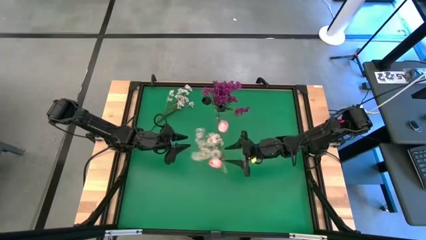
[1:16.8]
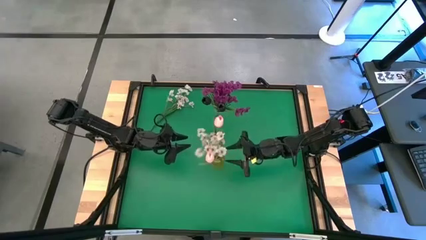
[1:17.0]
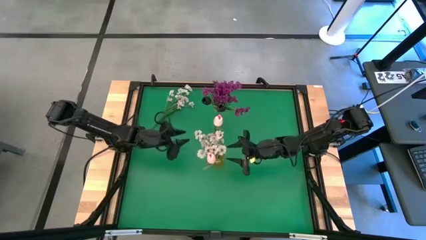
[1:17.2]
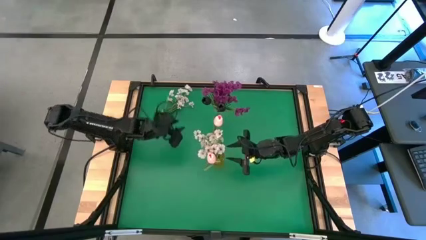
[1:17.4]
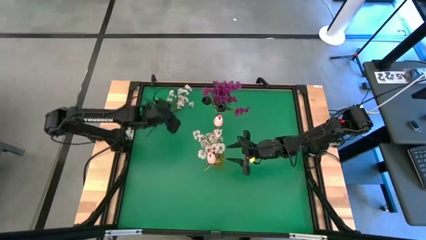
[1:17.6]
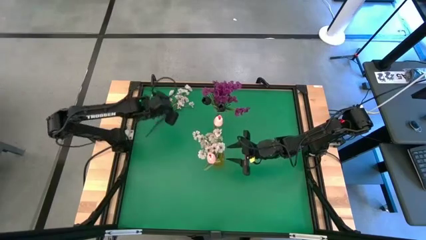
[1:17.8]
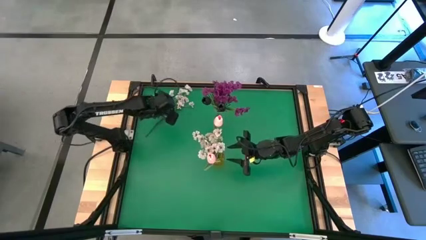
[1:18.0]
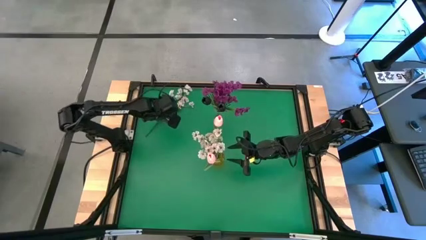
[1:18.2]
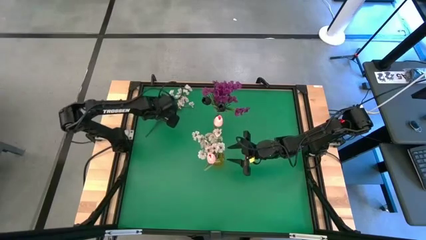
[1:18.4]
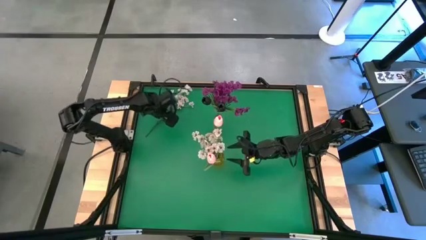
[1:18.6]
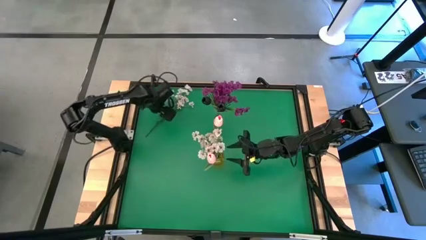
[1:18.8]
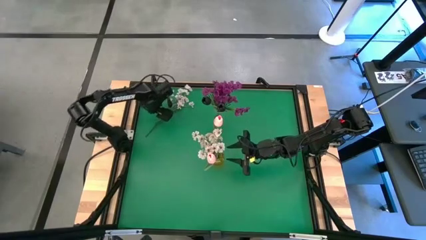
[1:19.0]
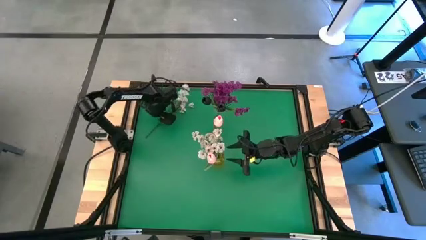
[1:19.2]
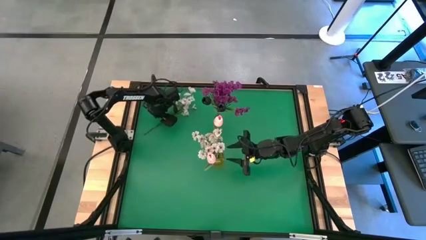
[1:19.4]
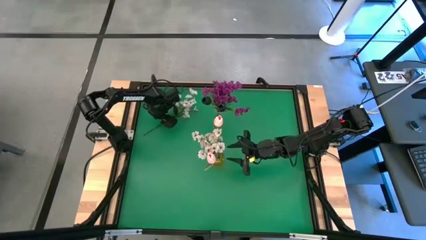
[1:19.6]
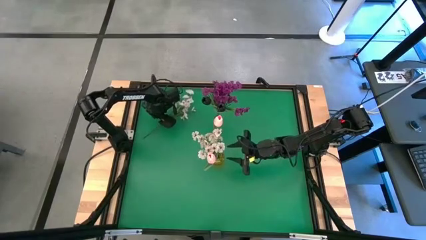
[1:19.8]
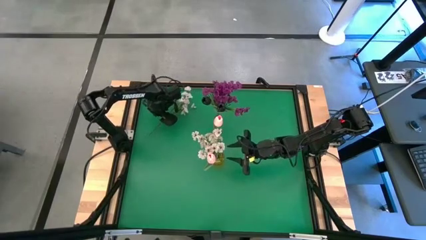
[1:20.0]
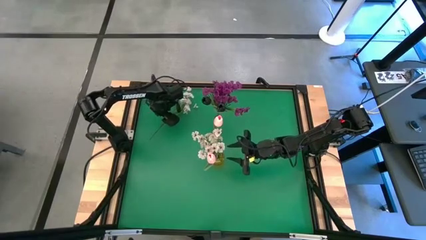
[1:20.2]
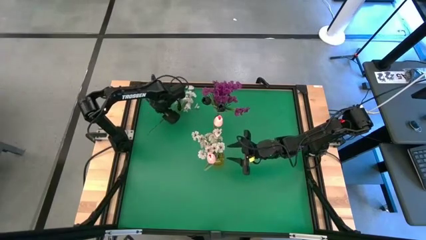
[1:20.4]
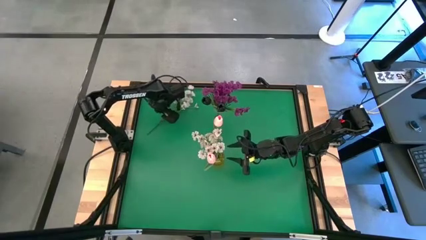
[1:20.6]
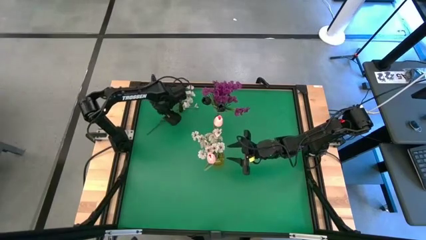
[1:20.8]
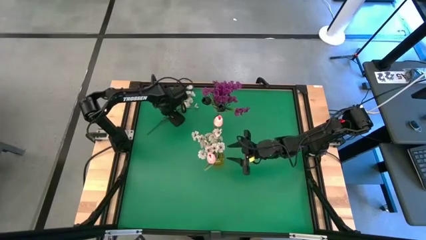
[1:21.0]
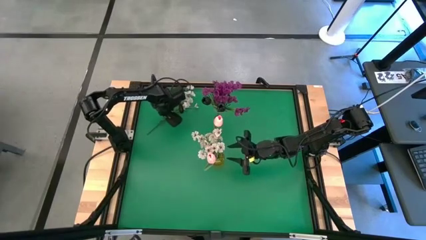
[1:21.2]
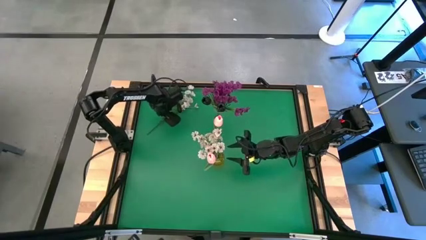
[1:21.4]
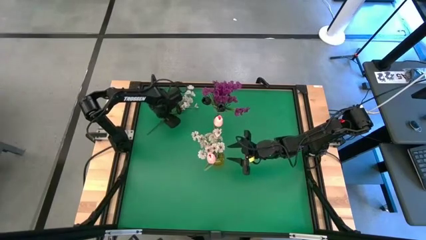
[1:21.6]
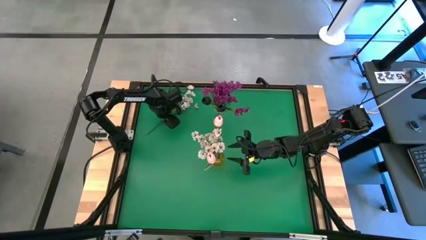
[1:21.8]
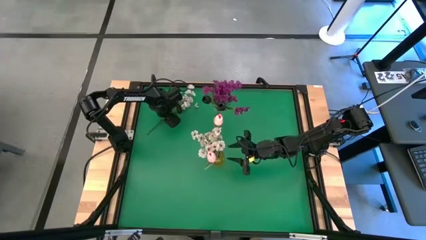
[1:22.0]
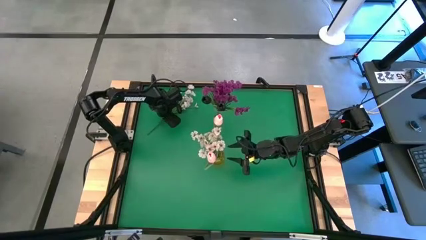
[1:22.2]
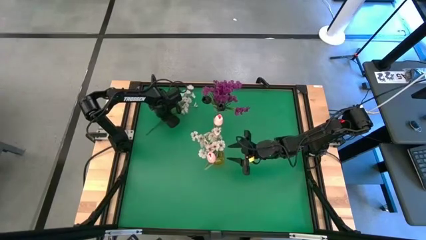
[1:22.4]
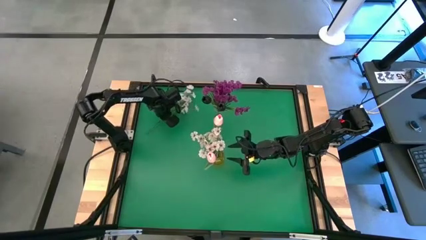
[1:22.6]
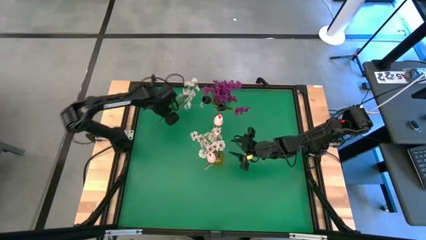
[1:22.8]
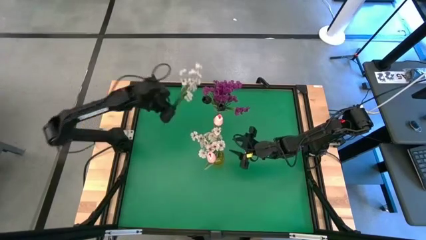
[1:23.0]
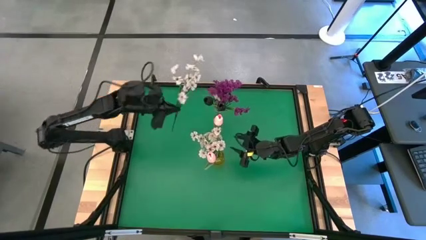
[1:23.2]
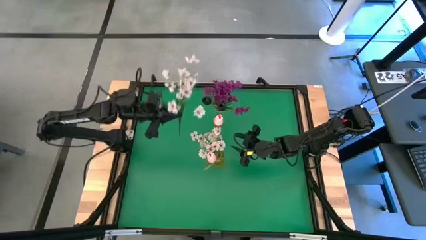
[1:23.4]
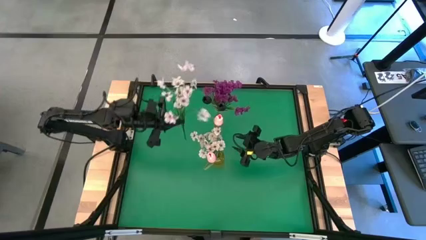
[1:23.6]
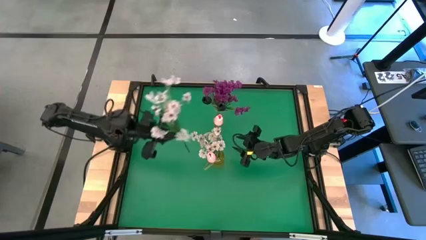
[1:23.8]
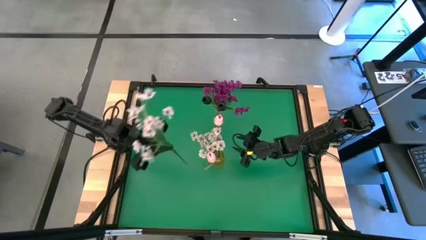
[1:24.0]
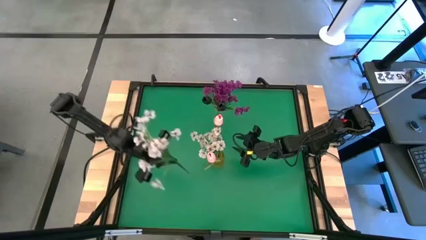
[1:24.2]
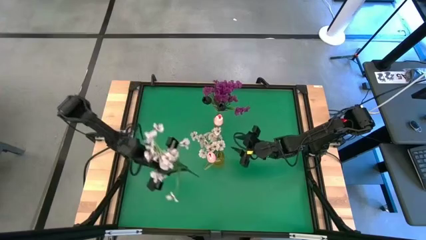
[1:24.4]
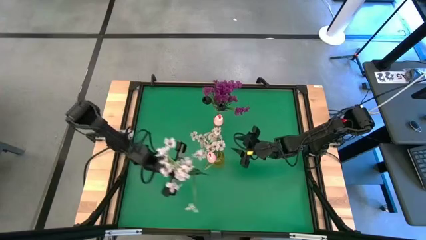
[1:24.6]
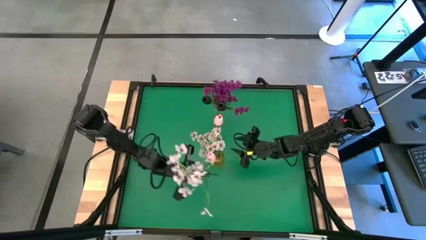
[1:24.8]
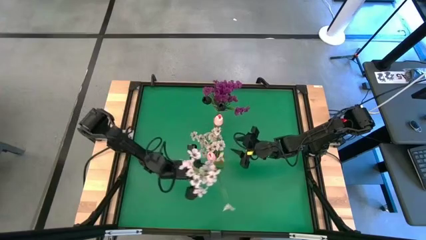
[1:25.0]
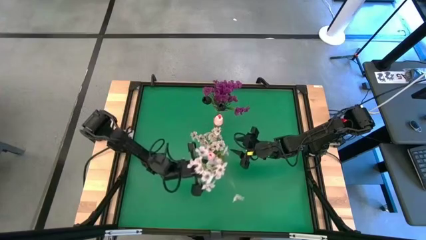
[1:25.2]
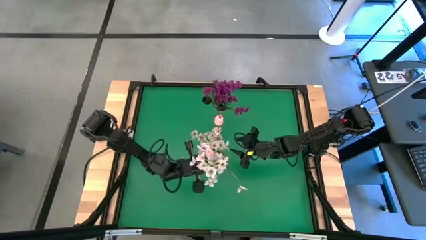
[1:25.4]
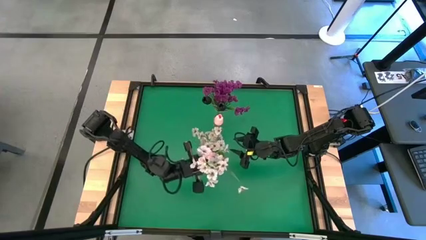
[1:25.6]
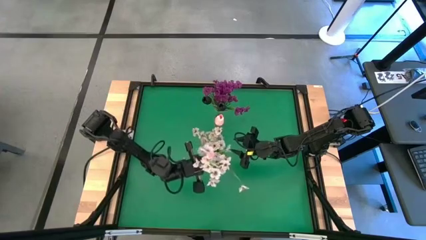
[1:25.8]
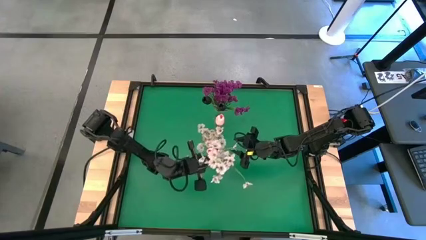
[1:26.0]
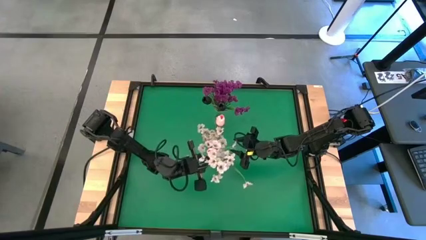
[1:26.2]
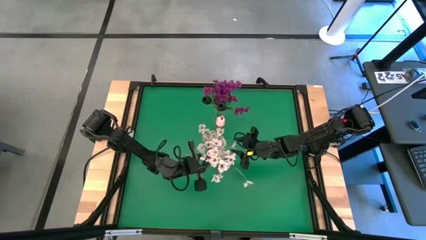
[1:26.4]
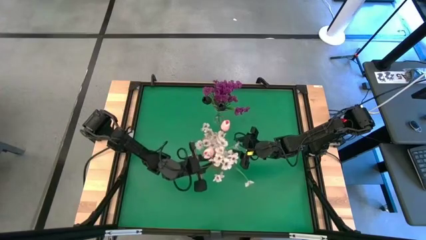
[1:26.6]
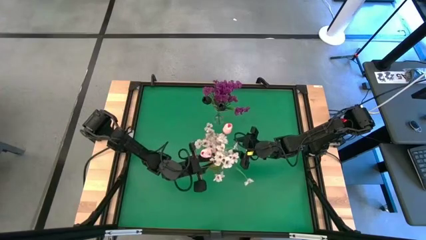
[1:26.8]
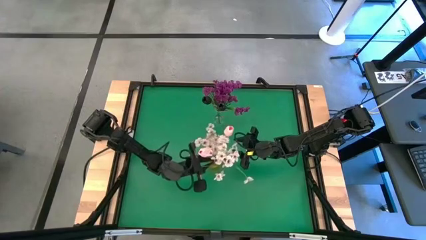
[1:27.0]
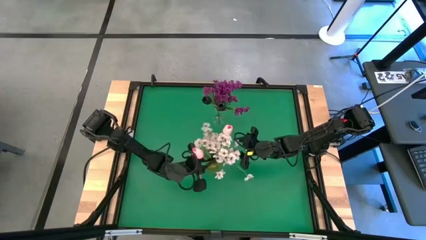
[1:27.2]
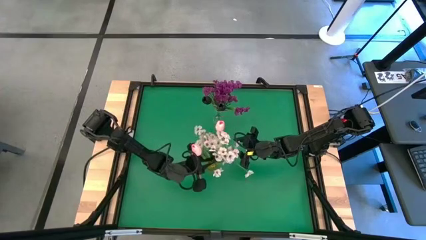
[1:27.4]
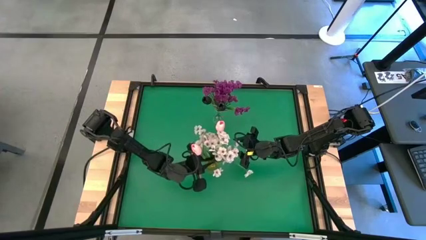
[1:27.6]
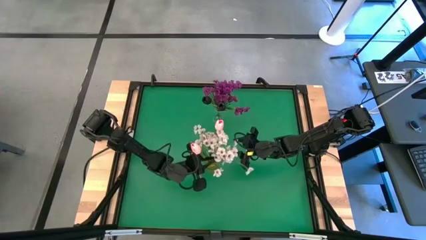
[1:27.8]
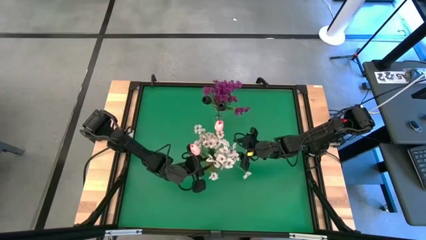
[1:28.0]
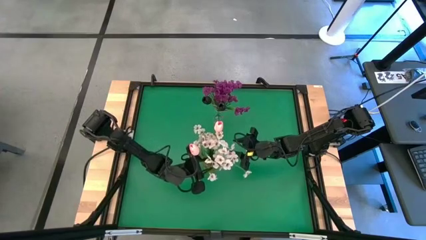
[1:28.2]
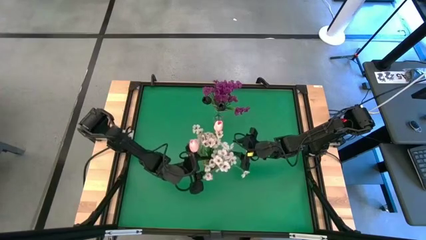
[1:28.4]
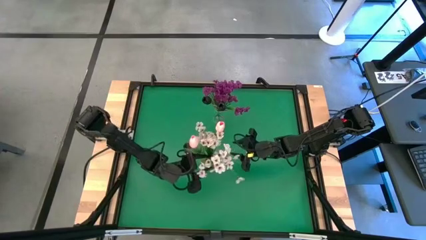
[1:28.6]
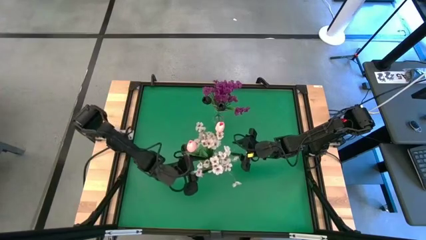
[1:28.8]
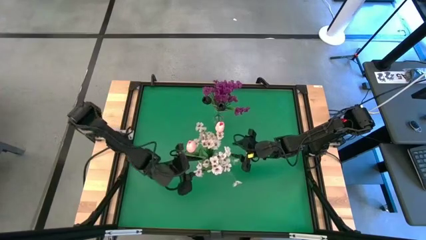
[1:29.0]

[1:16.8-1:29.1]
Task: Sort flowers into vase by color
Put the white flowers into the yellow vase

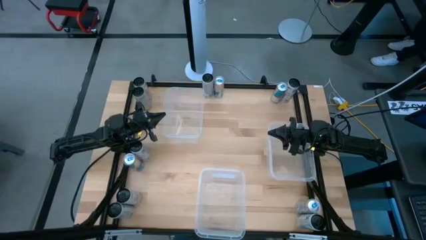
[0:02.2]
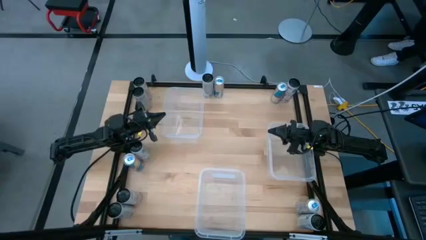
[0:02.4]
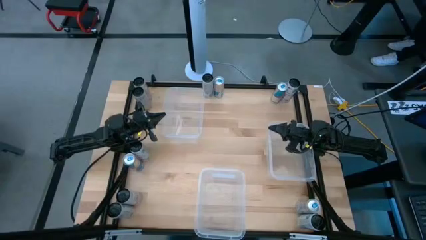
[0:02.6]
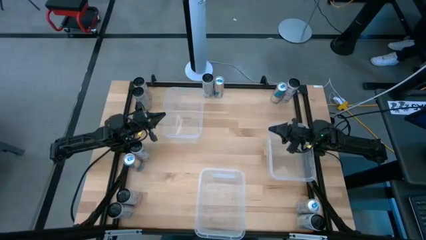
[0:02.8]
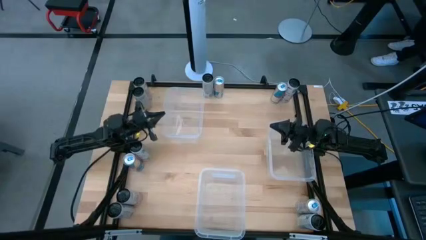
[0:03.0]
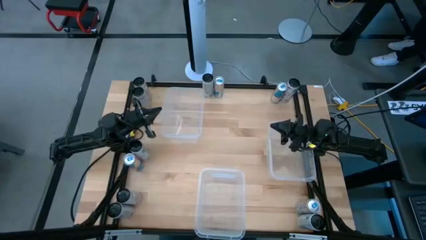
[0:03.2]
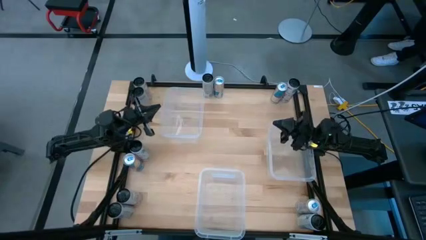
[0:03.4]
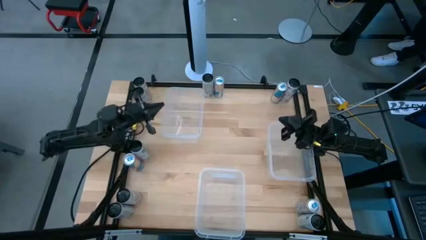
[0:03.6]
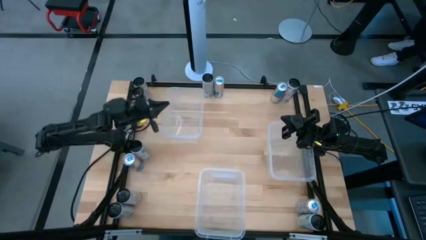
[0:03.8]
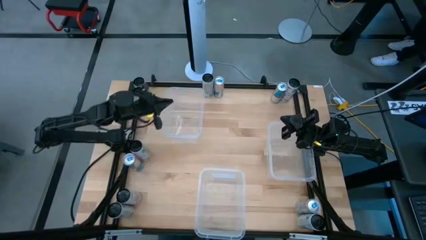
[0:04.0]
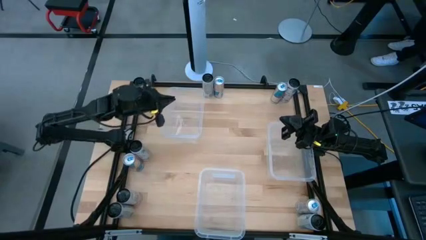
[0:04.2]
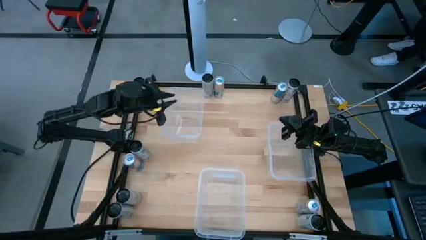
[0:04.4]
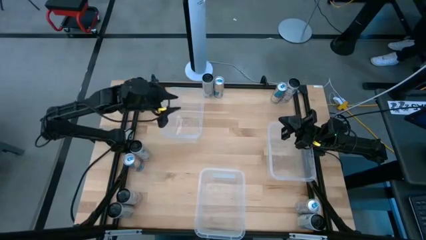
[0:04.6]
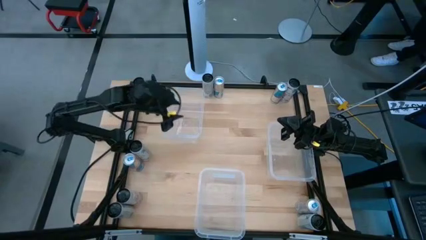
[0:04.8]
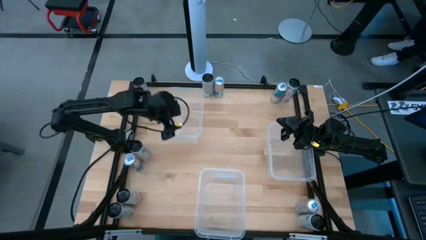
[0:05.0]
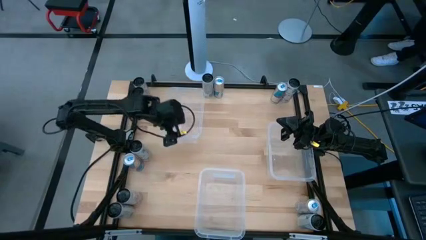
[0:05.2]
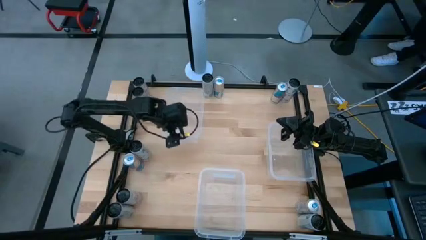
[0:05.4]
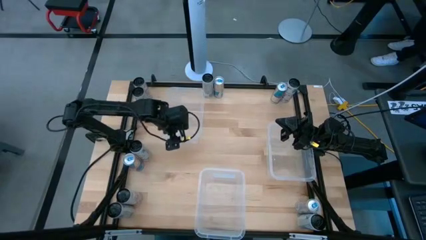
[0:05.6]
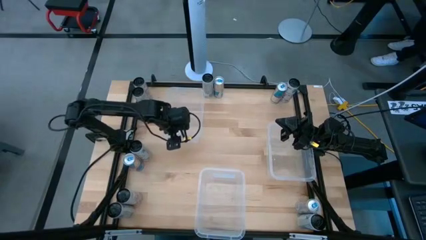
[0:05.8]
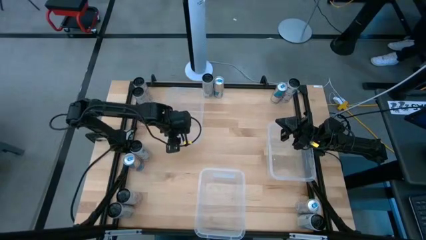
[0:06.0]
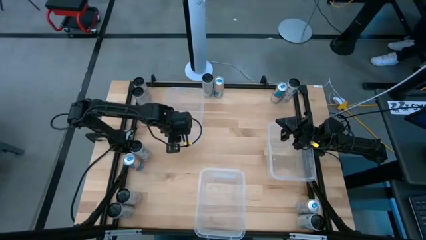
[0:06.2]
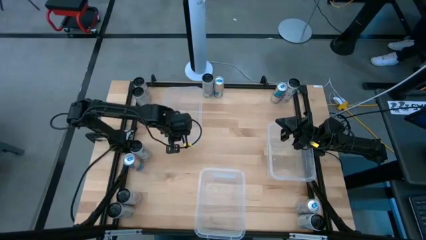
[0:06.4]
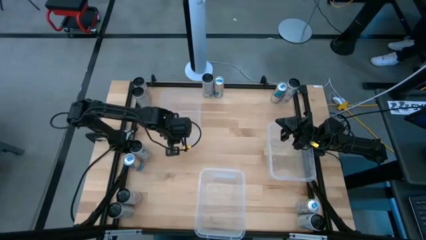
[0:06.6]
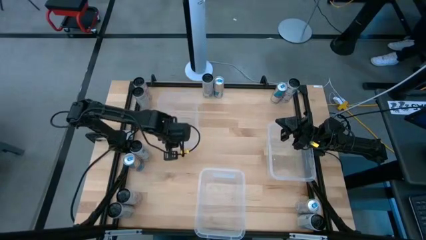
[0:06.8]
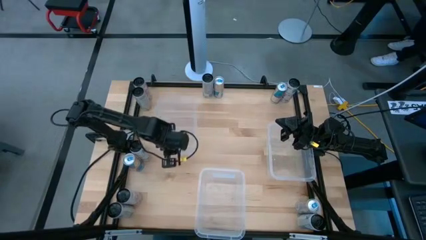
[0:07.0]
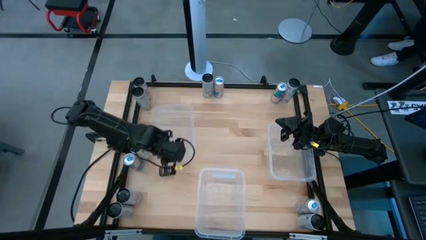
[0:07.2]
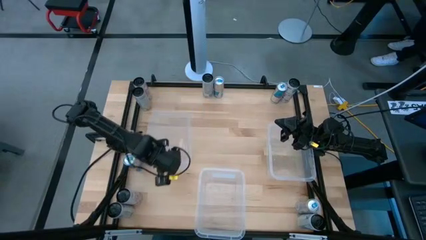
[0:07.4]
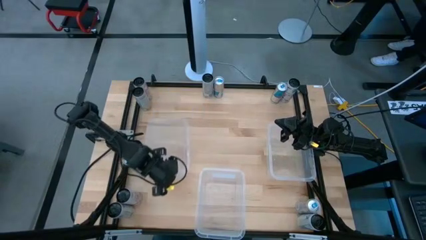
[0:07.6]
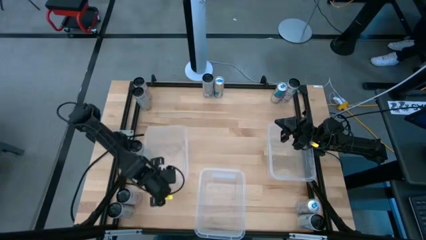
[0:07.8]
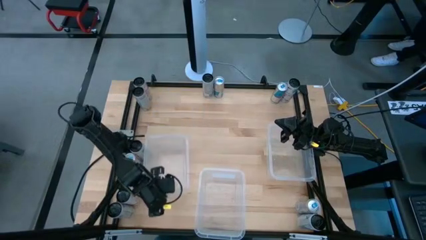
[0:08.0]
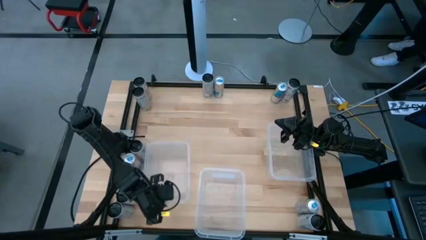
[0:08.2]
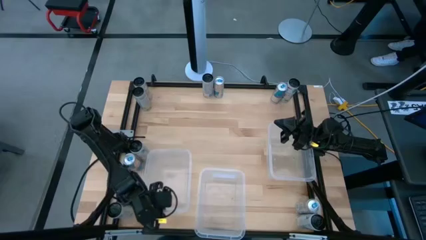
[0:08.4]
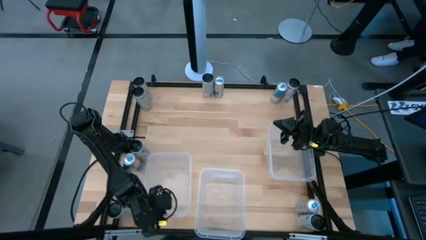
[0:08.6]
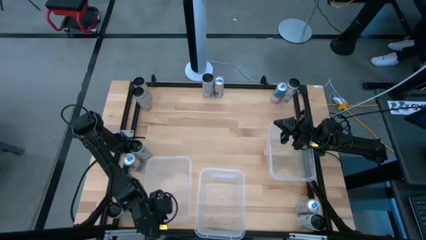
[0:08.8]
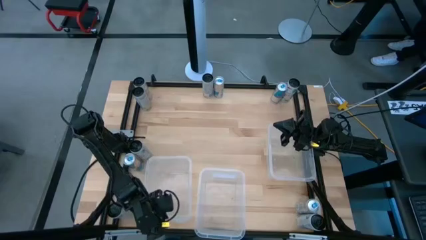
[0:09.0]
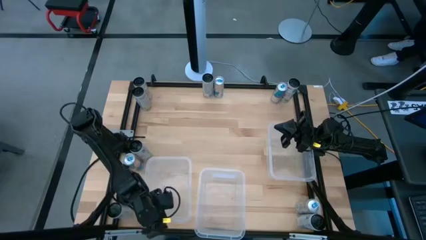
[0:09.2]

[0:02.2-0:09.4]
Task: Sort soda cans
Move the top transparent bin to the bottom left of the table
